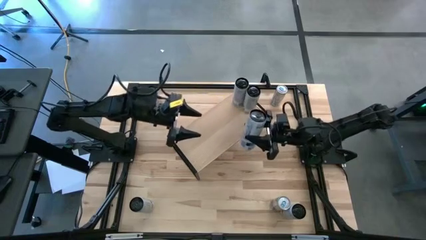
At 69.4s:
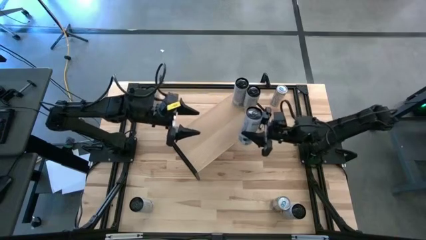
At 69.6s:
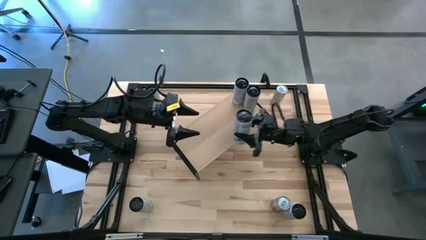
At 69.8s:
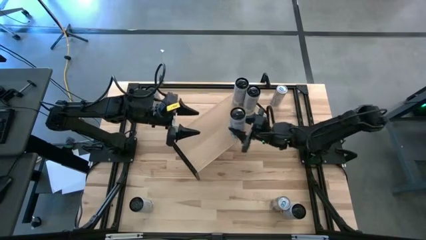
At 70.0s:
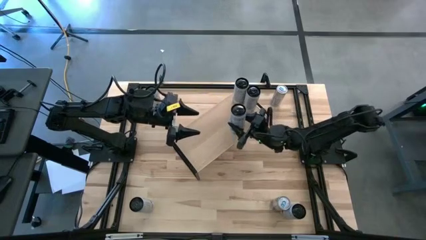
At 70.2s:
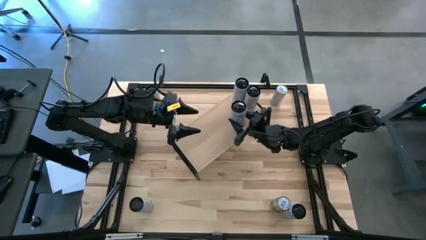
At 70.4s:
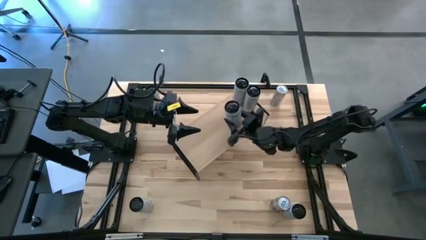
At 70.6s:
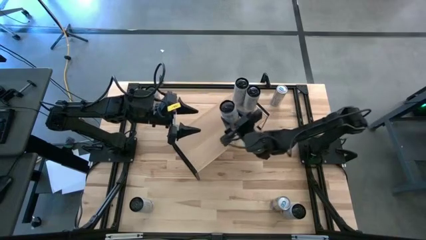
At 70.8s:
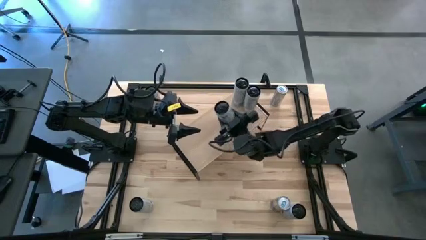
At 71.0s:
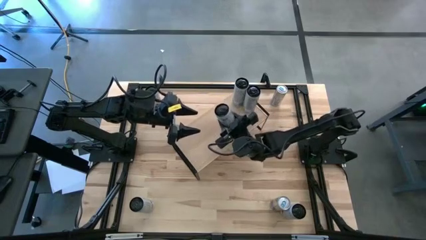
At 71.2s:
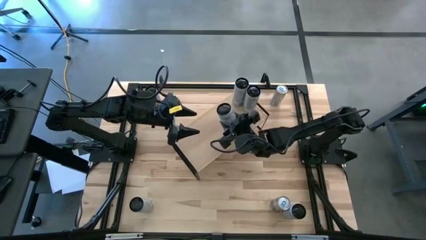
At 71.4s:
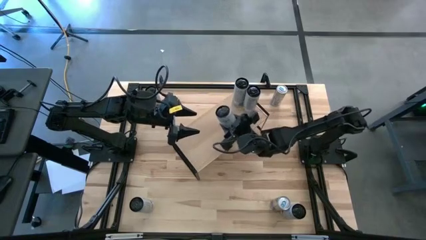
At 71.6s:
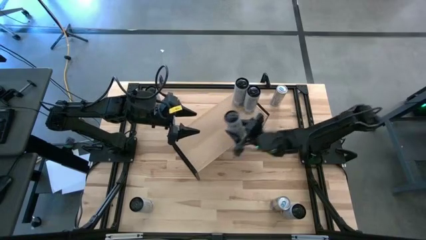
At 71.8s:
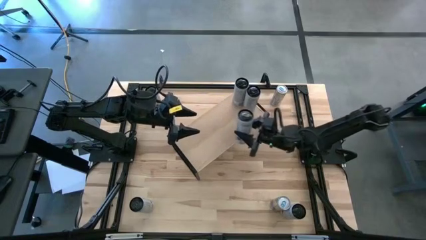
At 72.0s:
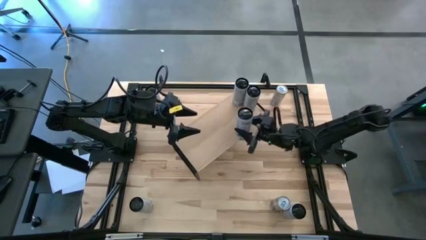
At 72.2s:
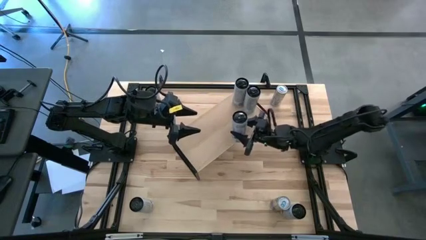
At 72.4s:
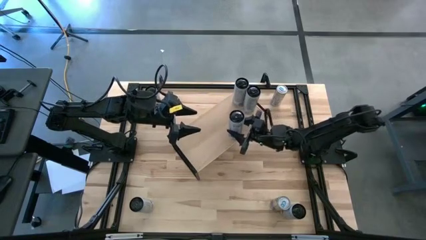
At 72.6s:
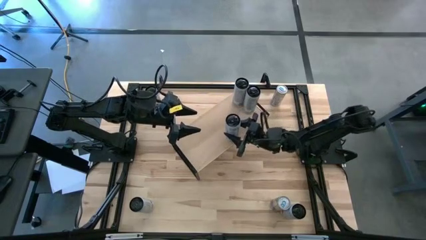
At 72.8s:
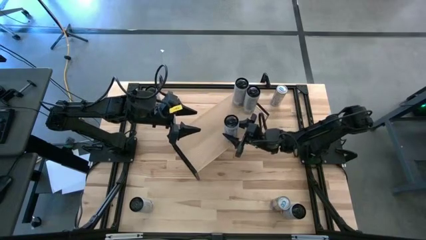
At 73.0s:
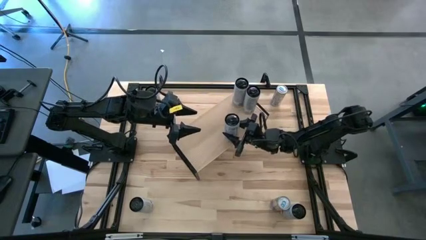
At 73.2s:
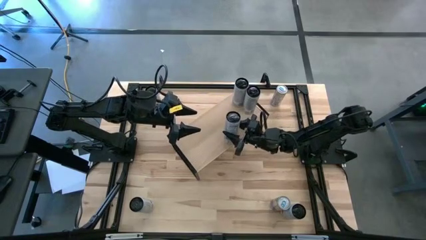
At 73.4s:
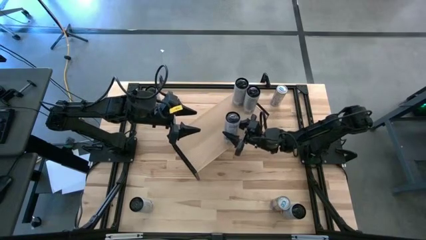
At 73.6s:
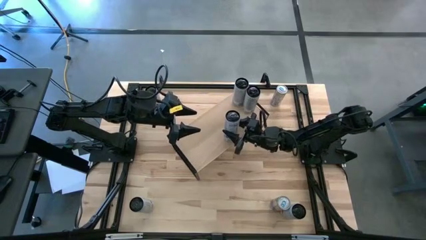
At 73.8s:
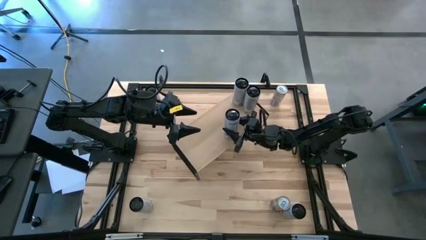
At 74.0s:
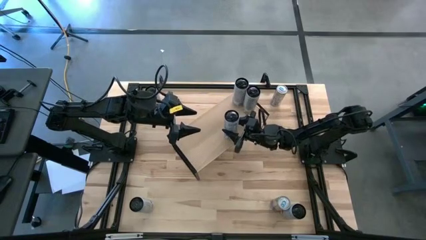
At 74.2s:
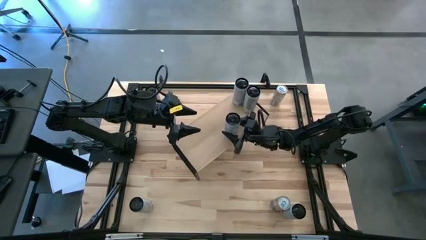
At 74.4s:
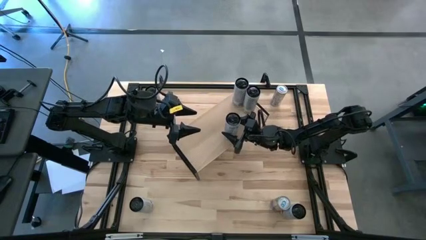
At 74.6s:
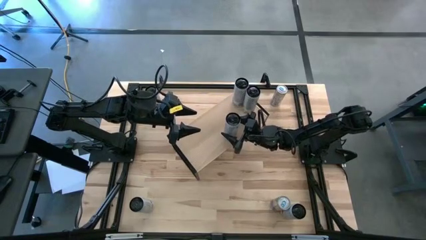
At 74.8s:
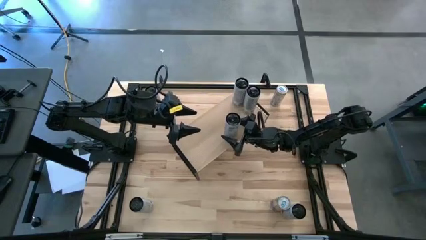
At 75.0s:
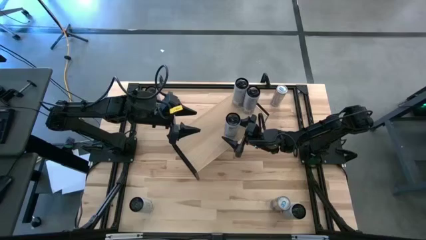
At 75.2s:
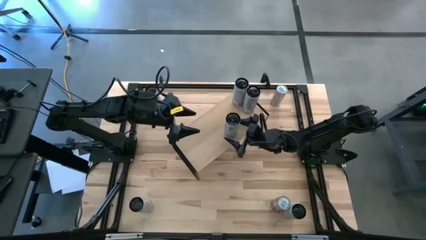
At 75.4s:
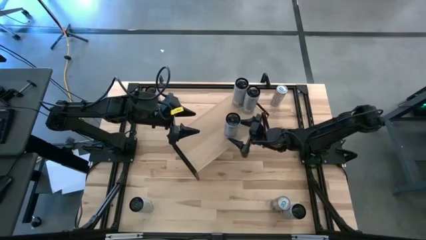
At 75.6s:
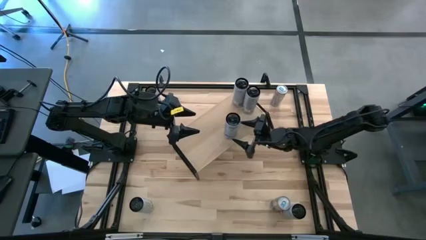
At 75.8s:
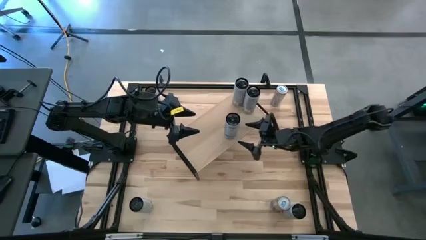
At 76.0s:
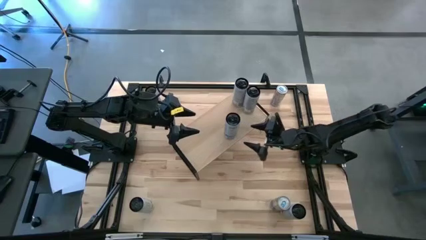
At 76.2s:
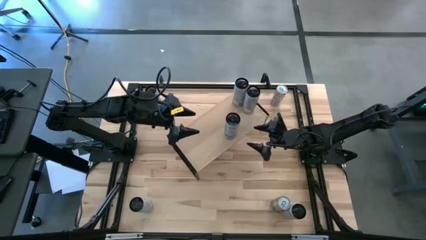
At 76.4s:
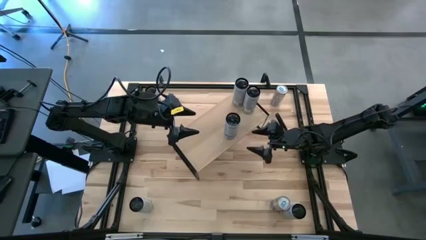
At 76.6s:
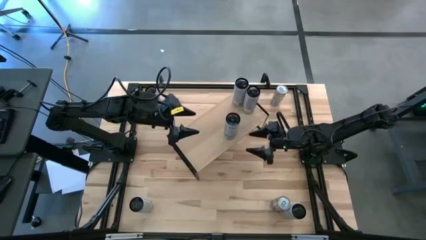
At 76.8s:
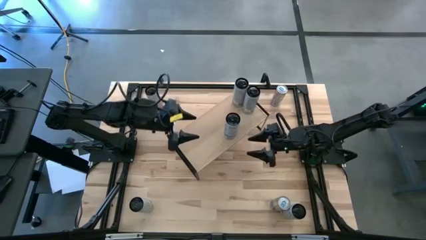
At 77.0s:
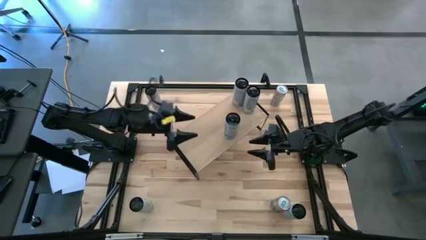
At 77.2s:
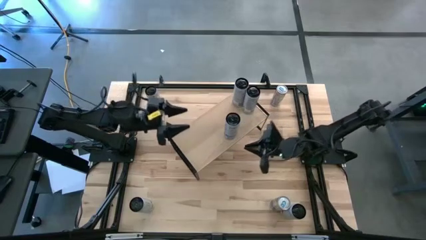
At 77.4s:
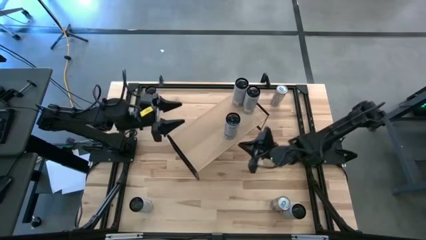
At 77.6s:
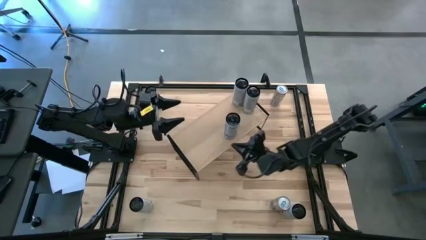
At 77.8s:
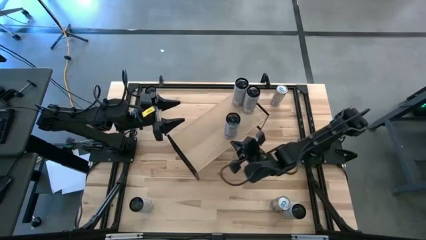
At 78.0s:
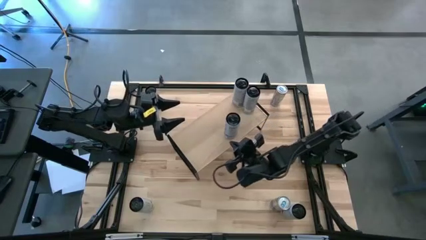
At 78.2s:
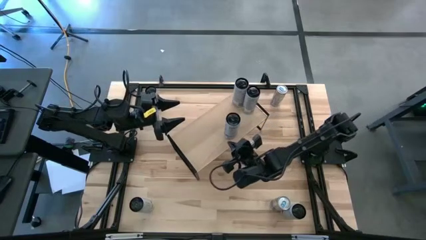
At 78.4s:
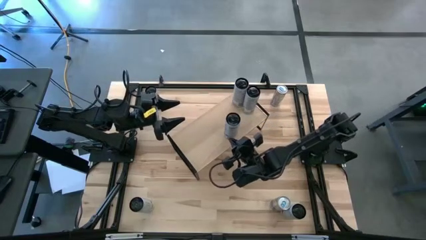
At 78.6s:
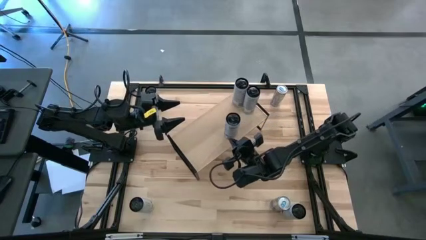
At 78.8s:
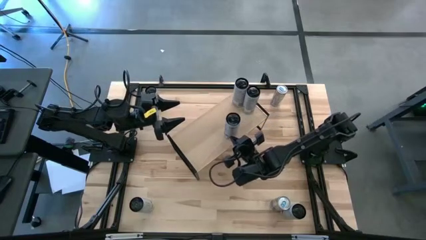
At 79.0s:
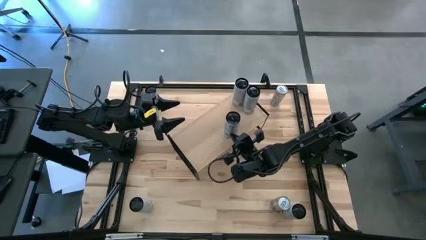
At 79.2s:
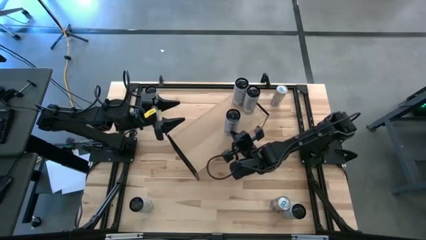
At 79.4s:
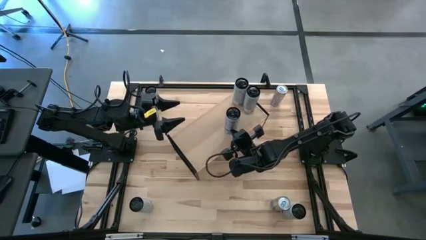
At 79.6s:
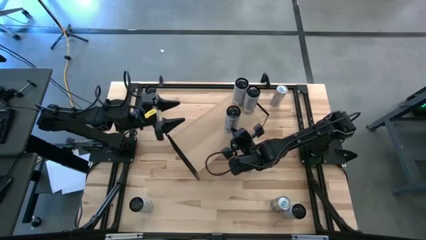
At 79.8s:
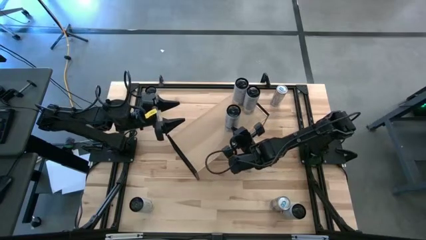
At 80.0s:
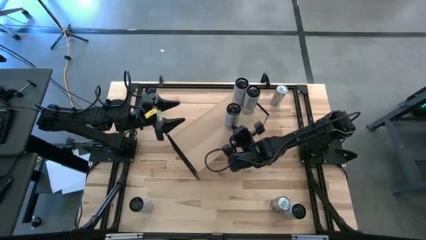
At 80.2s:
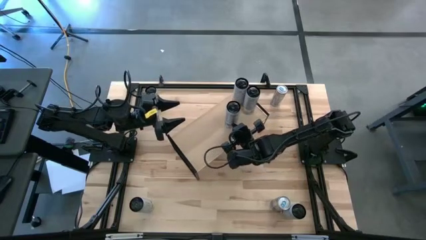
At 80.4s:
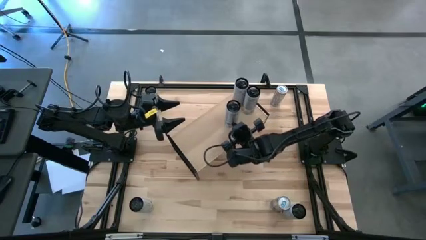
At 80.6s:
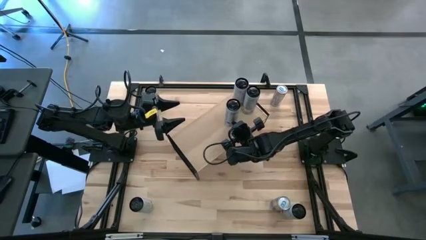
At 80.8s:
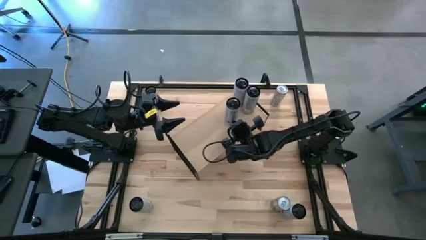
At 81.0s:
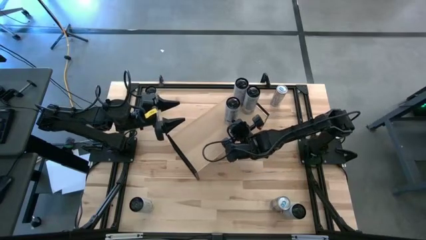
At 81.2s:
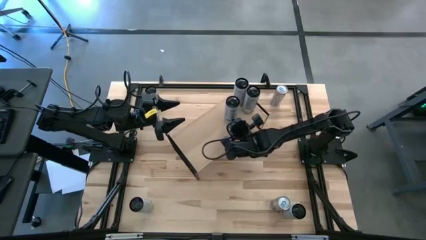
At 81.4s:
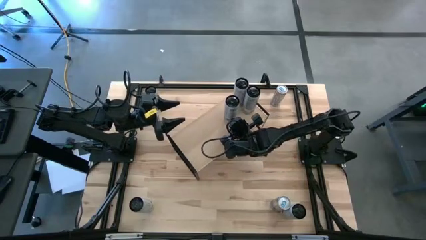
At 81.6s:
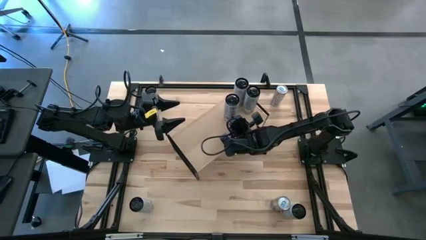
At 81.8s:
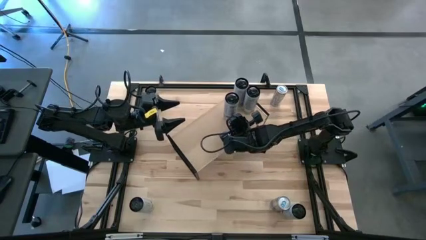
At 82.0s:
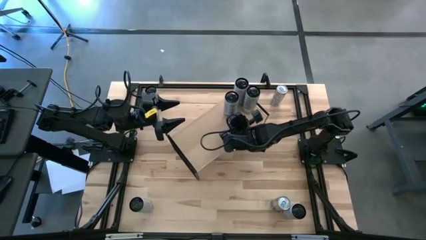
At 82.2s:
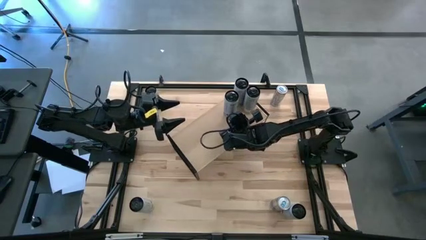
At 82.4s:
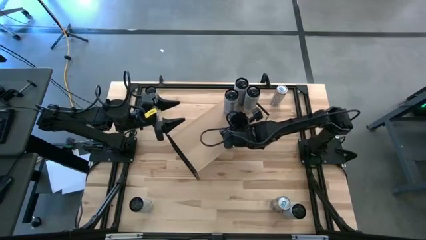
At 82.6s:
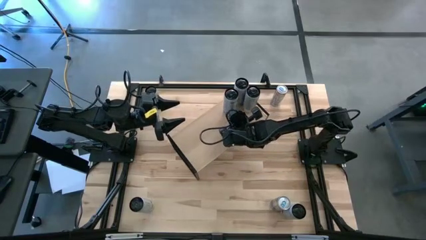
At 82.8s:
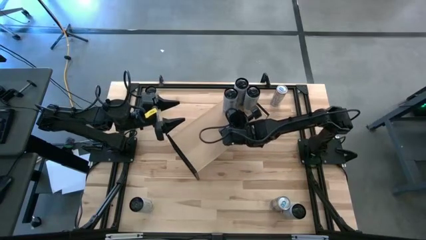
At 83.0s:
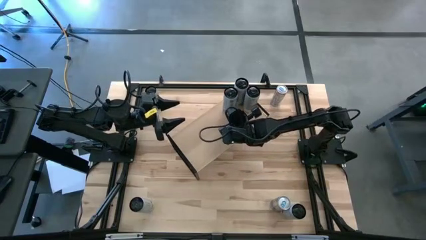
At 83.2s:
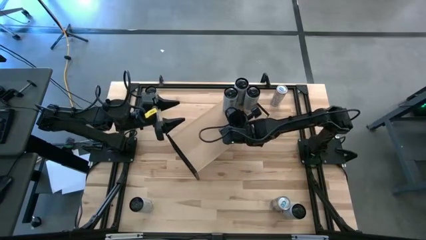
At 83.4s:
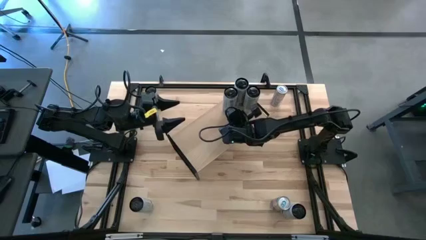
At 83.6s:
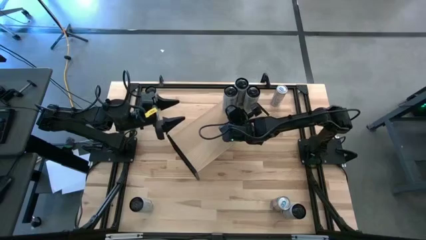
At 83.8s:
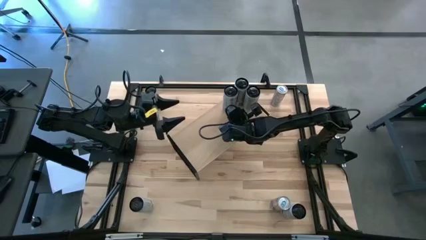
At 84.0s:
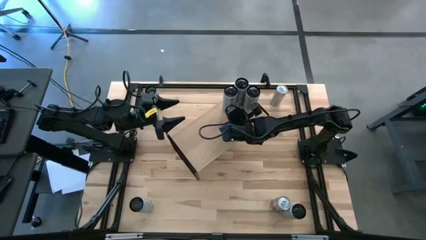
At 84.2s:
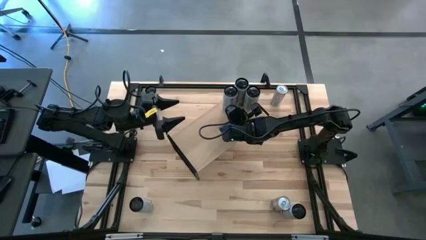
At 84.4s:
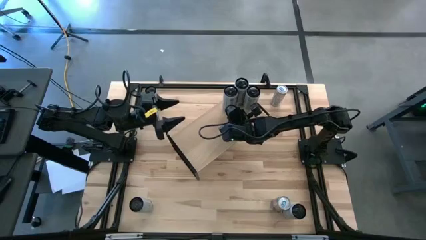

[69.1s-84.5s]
Task: Place canned beverage on shelf
Put the top white-blue soda can on the shelf
